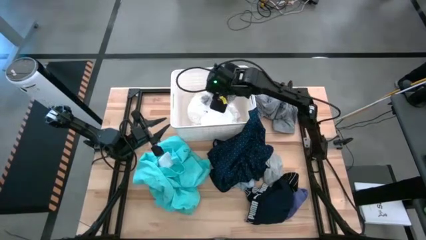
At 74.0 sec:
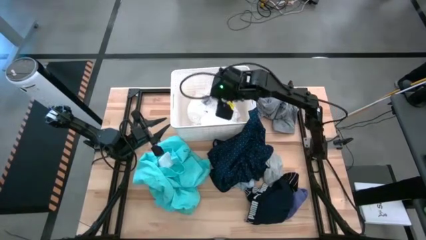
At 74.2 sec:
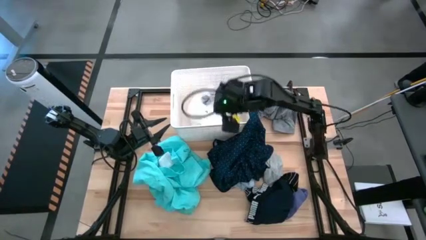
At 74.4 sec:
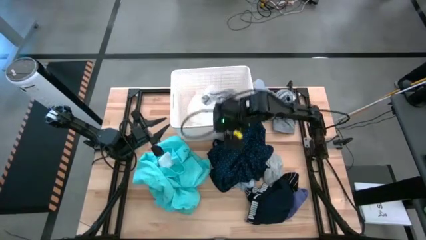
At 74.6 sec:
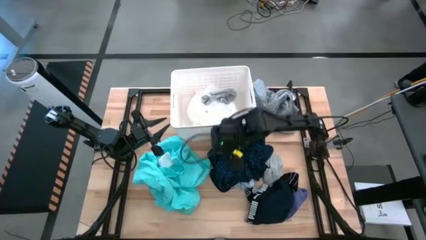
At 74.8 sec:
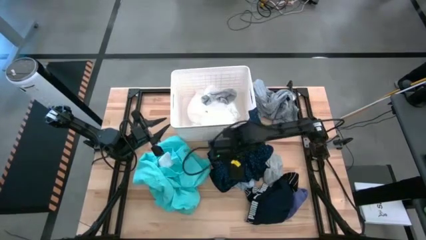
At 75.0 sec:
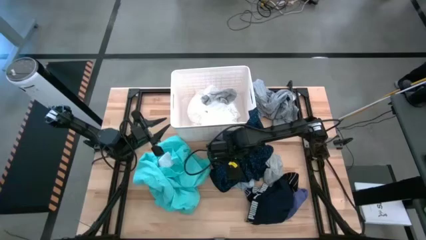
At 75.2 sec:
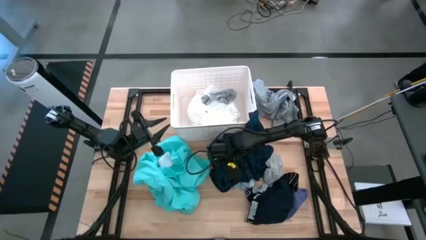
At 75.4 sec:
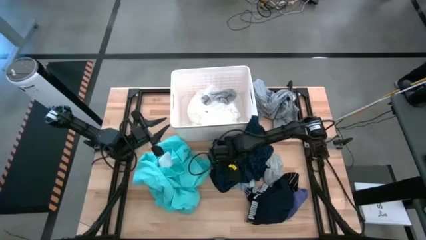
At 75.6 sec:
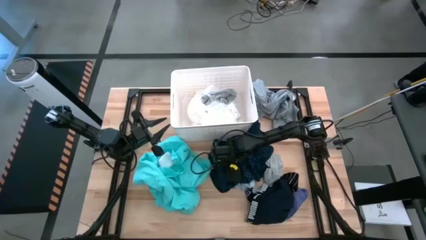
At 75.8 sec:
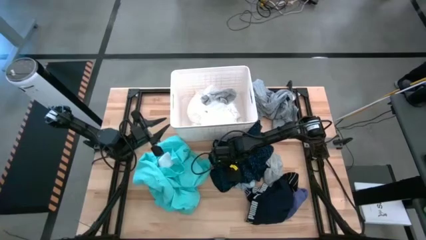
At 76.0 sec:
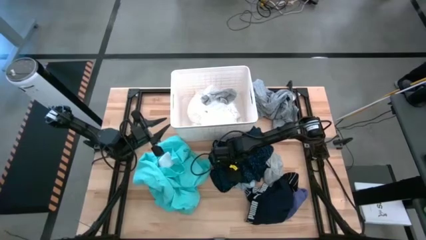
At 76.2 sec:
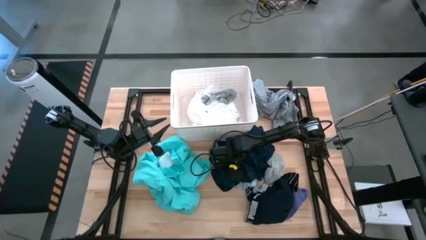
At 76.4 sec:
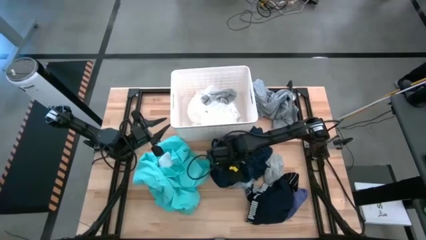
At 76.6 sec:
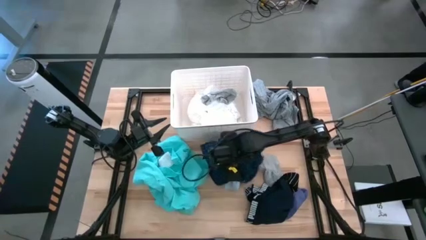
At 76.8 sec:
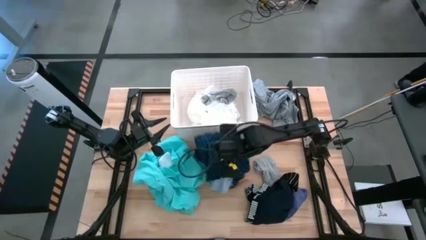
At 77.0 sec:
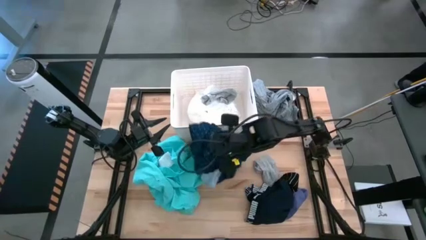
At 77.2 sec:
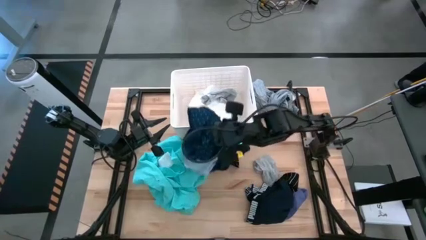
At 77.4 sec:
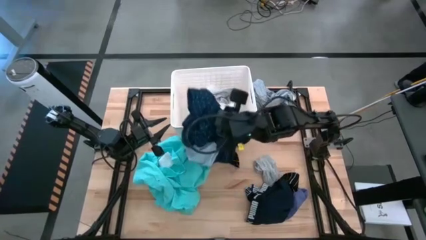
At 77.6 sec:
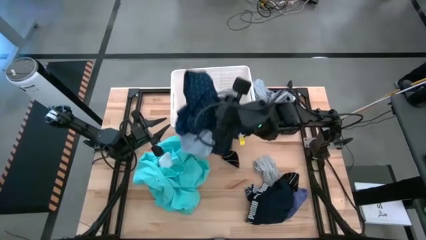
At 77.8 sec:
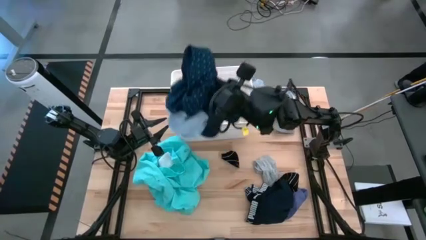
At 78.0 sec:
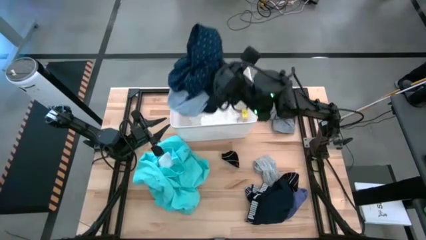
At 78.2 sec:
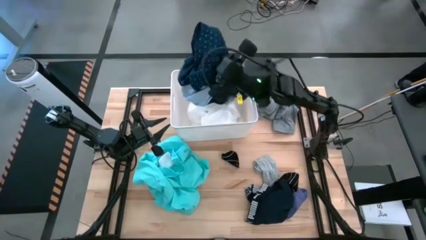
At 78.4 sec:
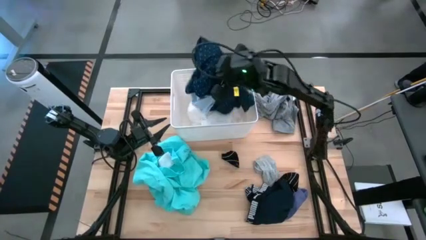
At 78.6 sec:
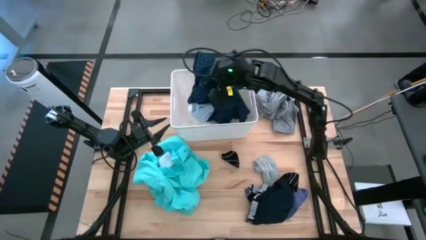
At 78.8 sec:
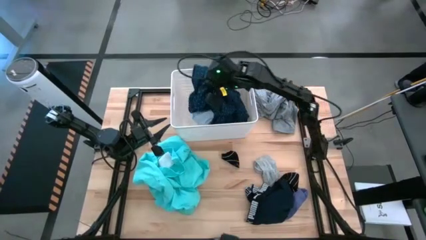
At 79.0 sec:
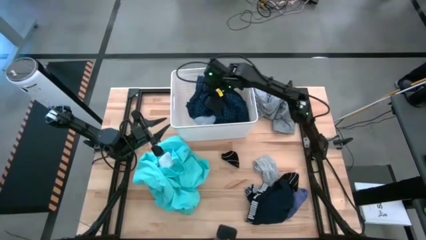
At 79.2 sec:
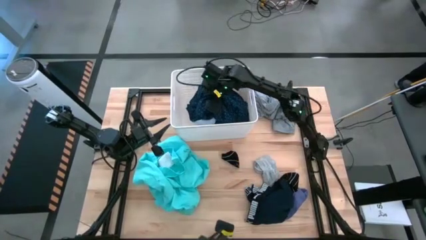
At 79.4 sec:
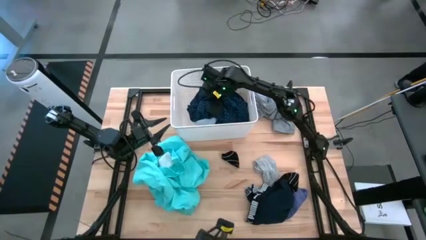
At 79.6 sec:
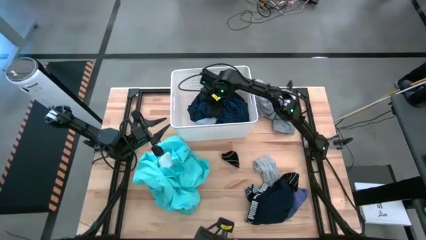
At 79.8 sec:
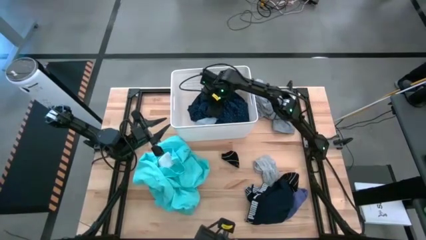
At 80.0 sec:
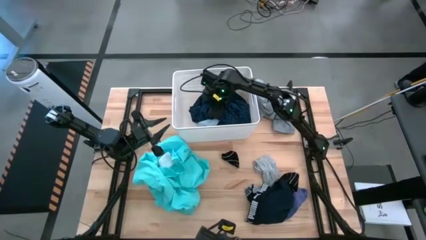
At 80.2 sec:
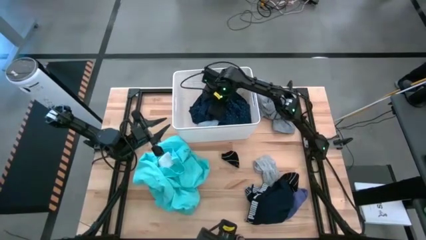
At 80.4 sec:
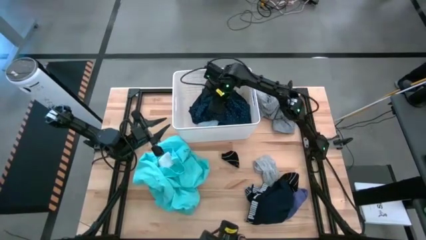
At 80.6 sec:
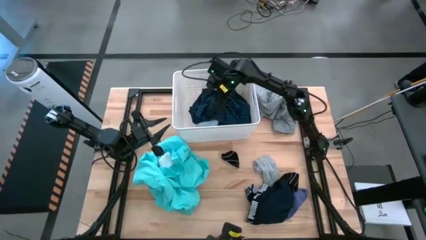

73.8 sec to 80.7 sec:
Task: Sort clothes
Put the dark blue polo shirt into the white laundry bin

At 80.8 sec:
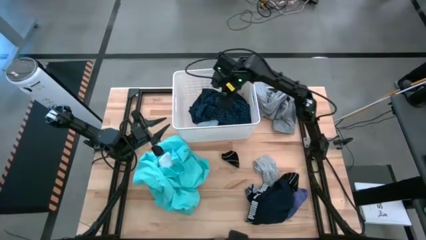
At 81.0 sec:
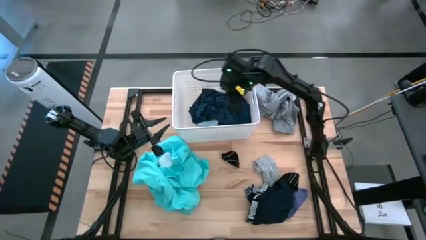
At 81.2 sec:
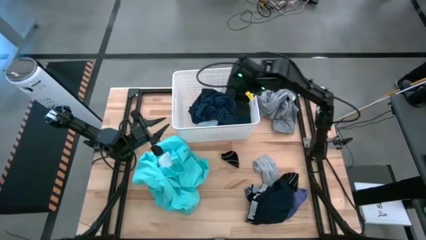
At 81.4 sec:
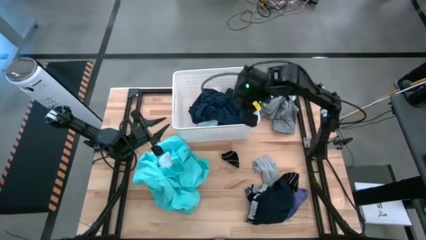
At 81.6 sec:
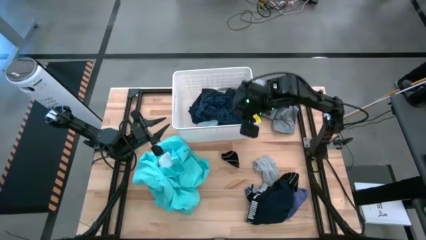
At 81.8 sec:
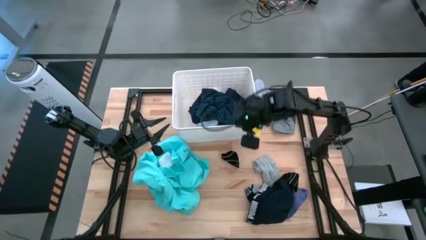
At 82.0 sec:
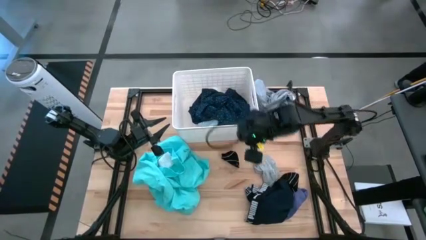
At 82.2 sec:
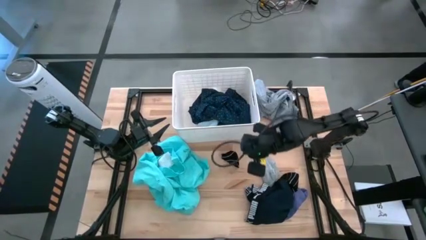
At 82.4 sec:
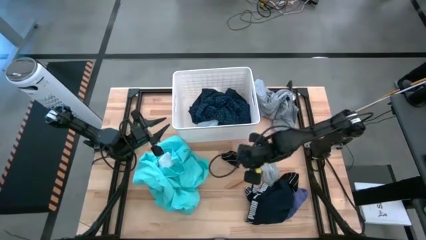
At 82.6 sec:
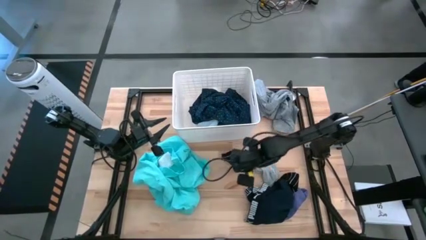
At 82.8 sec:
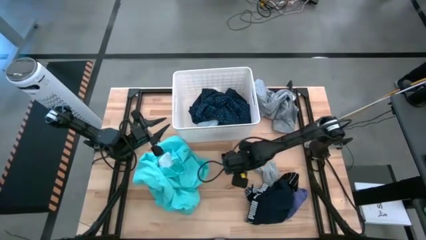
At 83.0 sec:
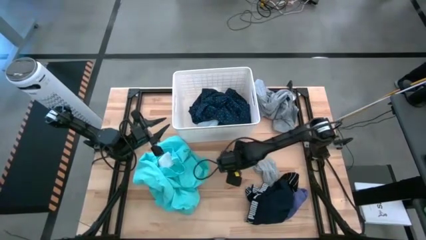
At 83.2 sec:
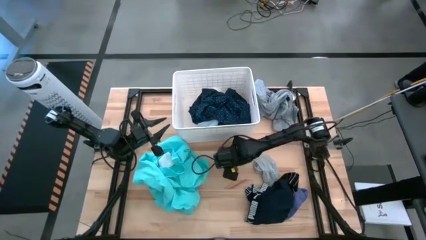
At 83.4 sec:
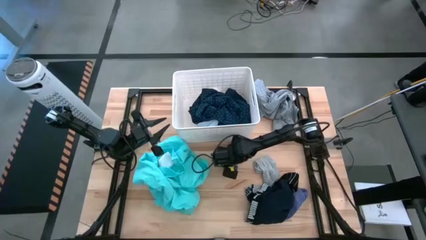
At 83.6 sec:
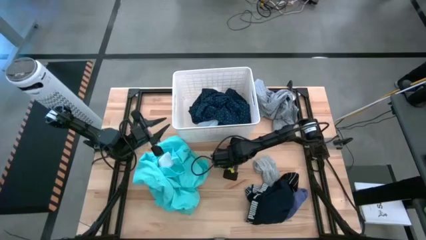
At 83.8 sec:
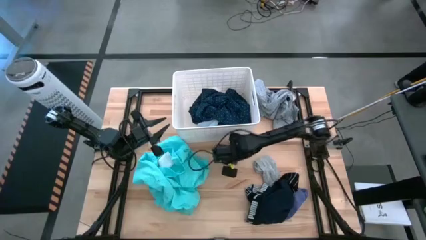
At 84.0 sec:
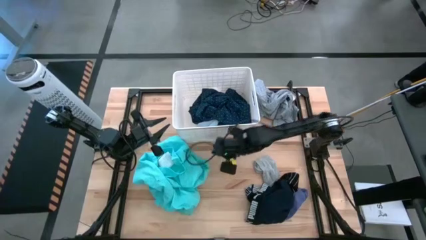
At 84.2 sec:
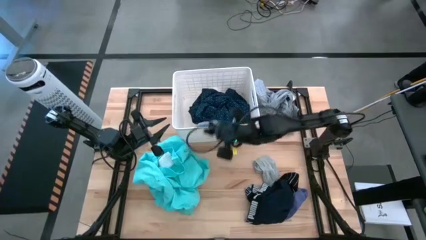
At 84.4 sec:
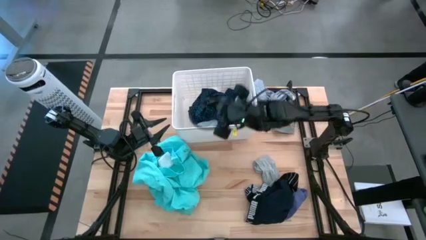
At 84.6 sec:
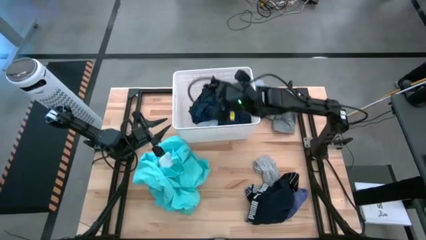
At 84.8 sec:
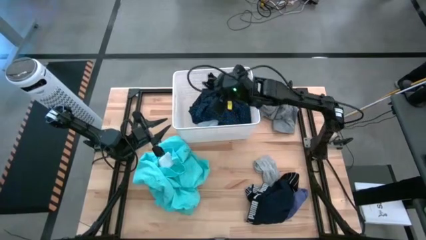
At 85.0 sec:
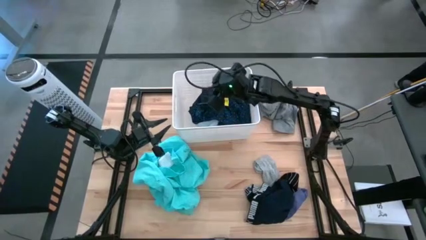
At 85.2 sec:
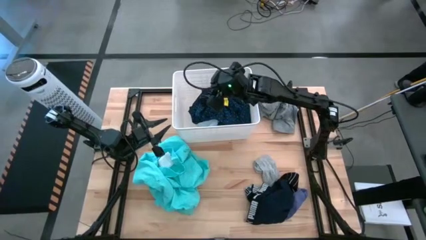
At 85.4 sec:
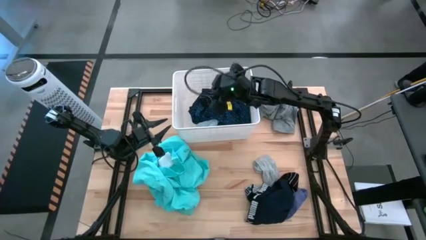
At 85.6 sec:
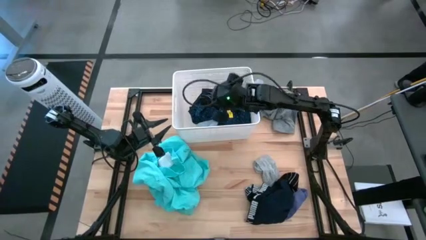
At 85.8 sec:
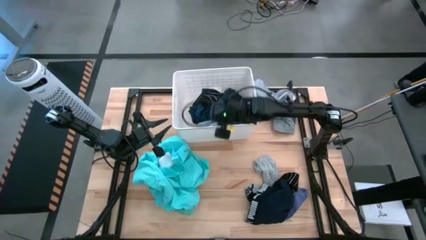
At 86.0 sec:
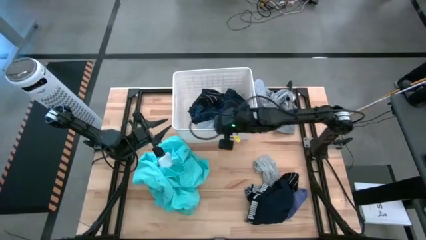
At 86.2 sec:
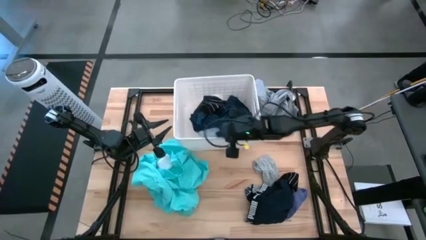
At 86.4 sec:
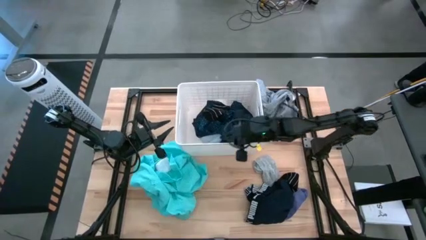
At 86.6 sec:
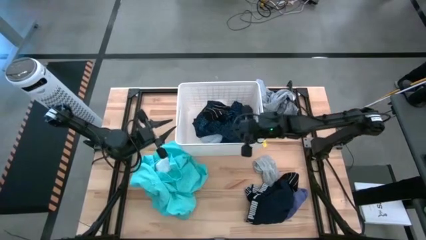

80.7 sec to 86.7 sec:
Put the black sock into the white laundry bin

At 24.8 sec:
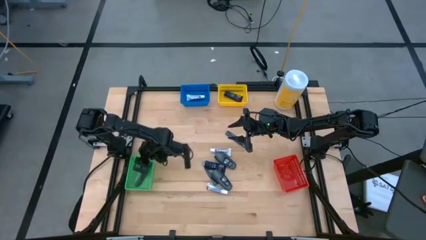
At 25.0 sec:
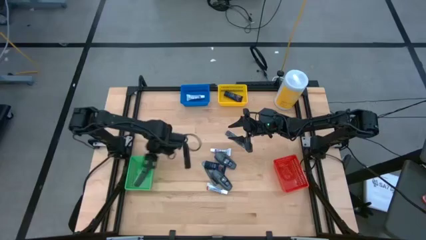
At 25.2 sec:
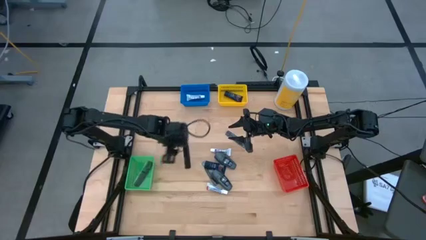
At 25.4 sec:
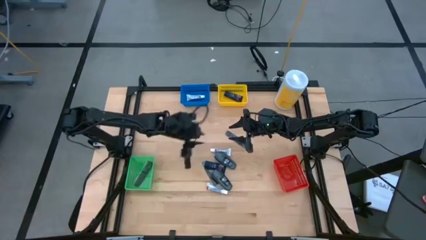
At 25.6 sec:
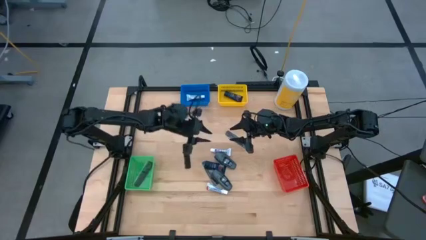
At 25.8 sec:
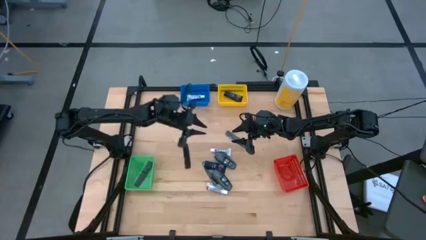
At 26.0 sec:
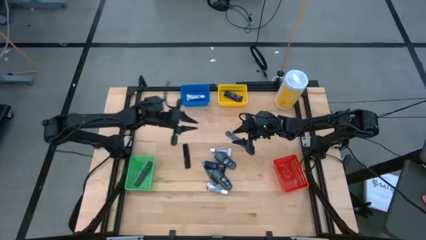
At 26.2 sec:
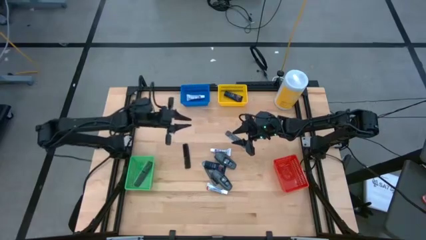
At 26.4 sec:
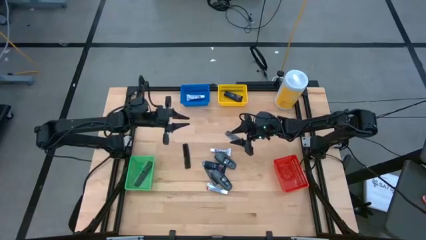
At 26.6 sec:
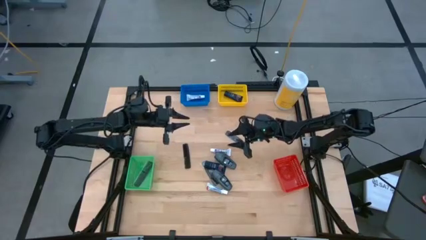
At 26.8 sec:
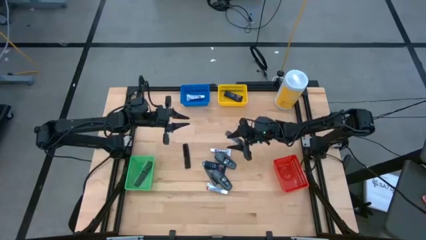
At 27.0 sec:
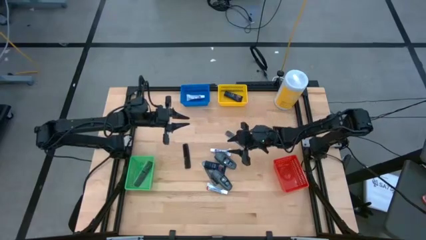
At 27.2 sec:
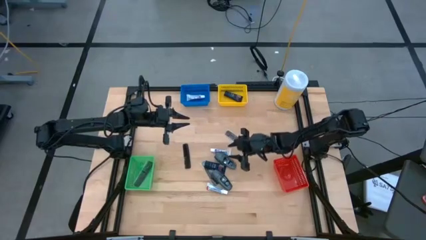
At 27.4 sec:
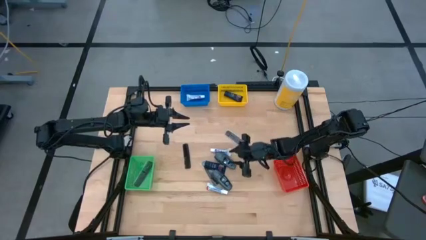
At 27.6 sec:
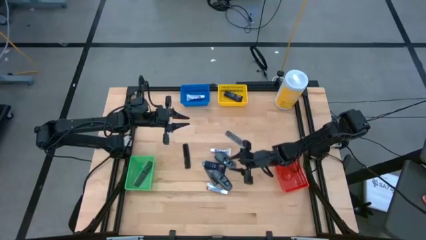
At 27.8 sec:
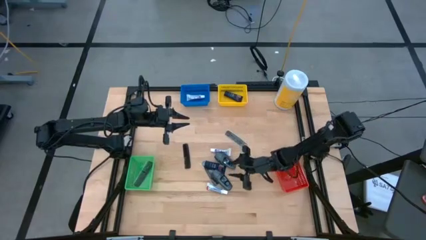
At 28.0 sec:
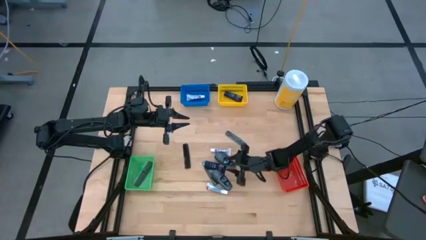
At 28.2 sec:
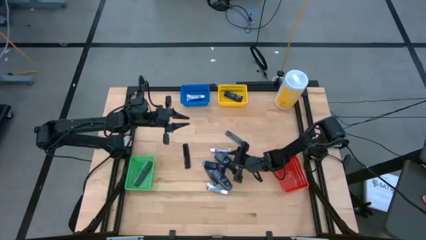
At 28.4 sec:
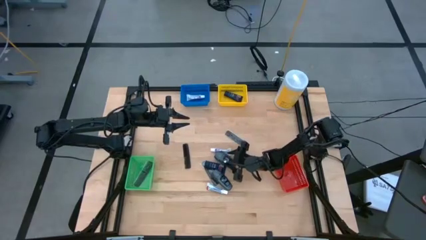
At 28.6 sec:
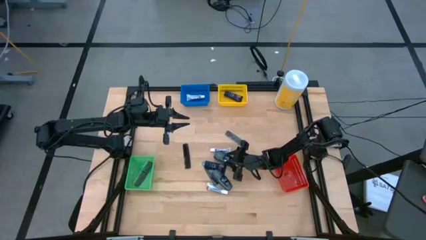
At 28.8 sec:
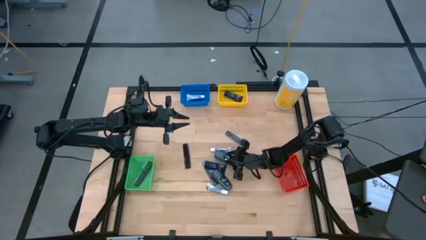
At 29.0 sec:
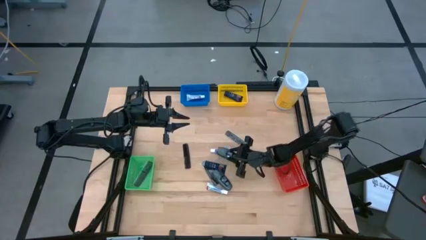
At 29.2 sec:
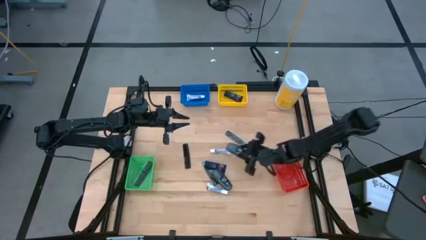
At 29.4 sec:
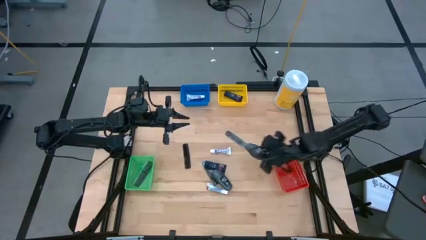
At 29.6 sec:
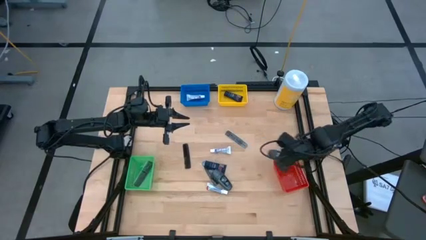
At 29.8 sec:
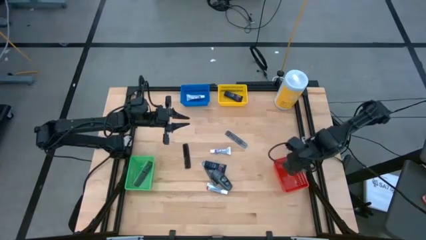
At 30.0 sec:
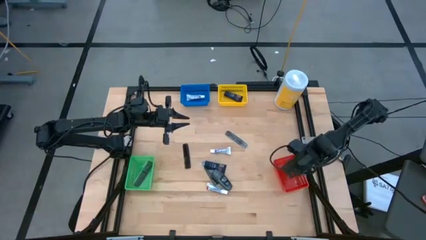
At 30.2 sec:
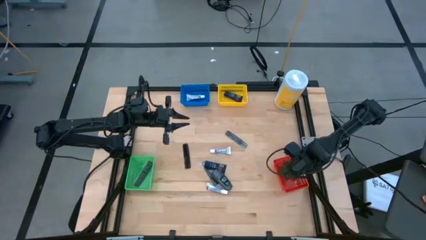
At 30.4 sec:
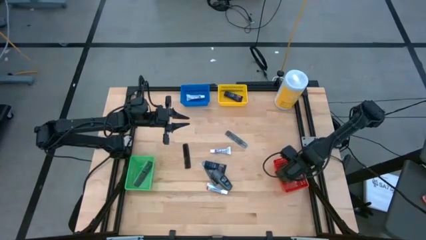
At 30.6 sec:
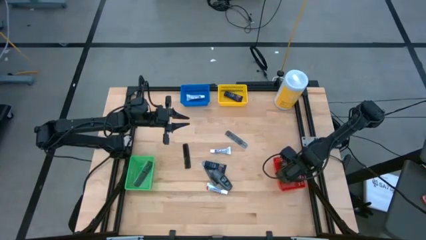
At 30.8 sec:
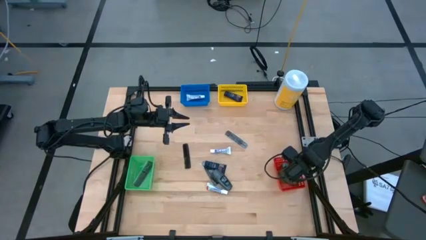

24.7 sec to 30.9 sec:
Task: Pick & Place Travel size toiletries
Put the black deodorant into the red bin
